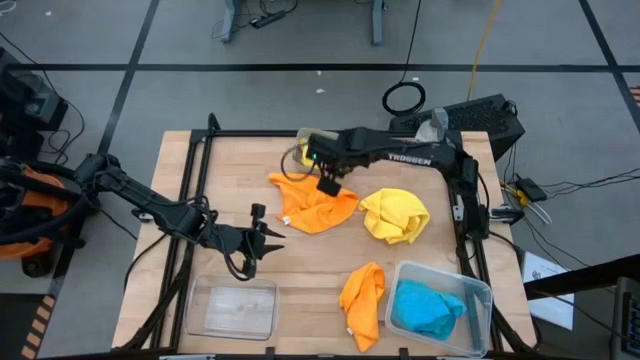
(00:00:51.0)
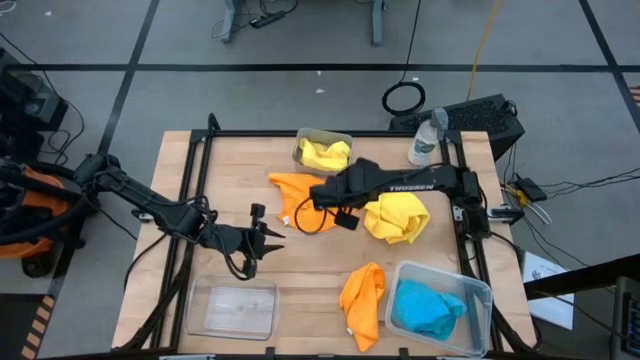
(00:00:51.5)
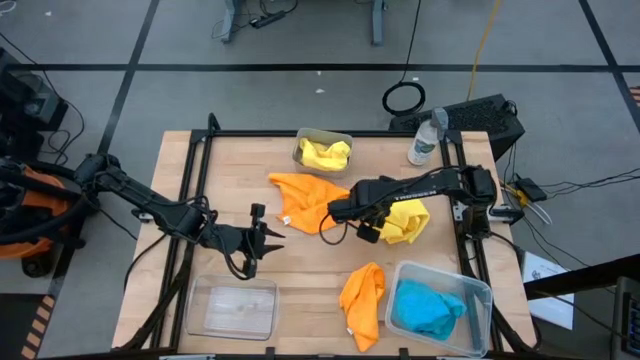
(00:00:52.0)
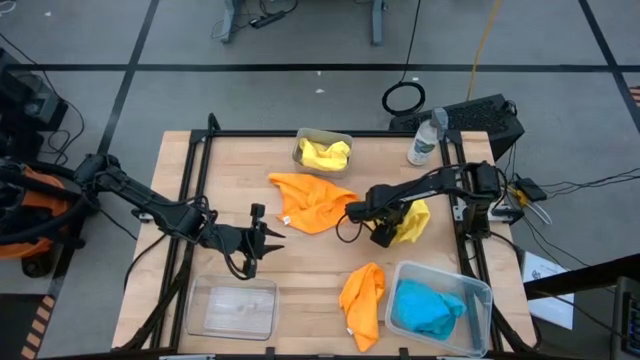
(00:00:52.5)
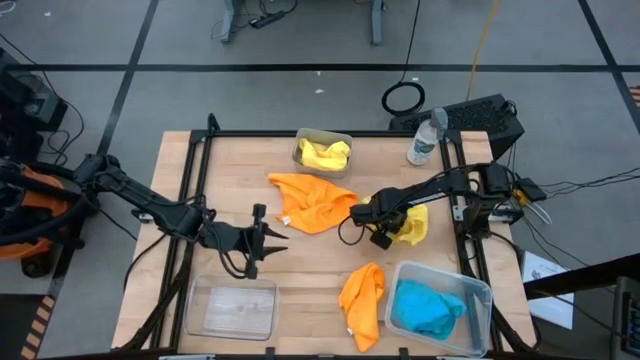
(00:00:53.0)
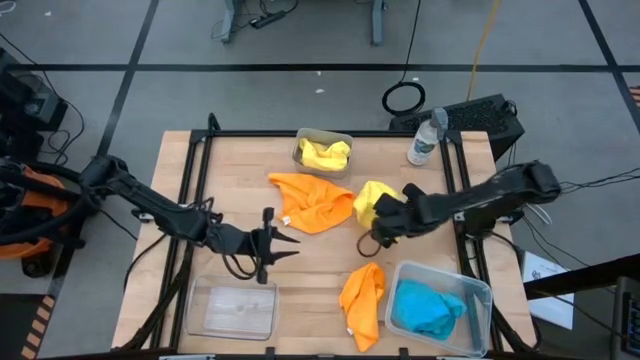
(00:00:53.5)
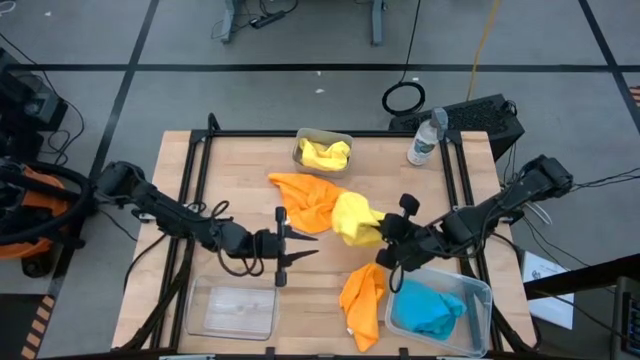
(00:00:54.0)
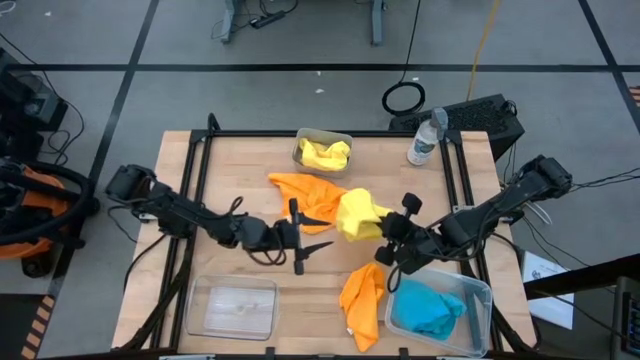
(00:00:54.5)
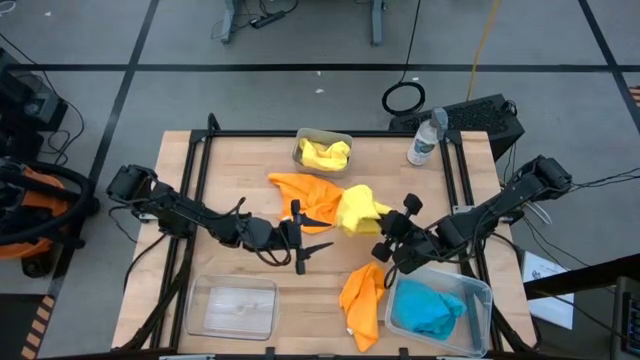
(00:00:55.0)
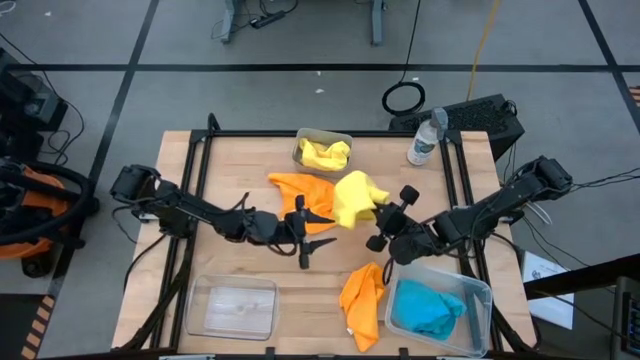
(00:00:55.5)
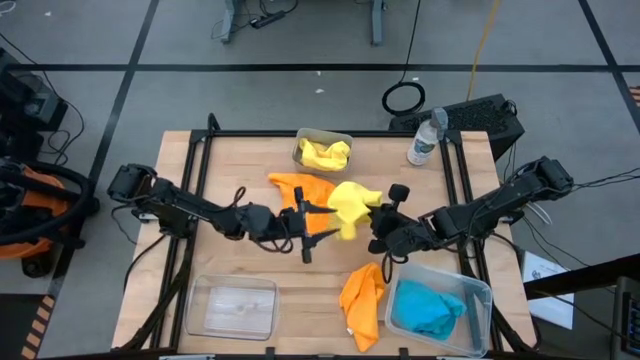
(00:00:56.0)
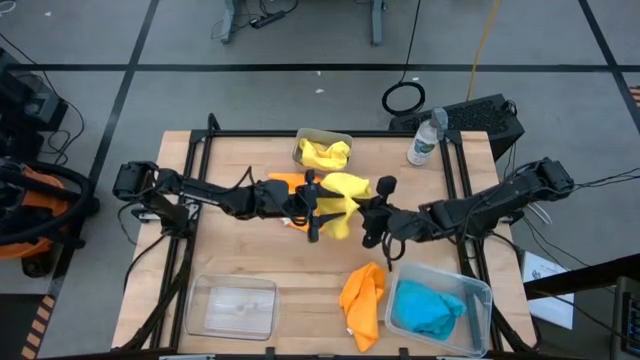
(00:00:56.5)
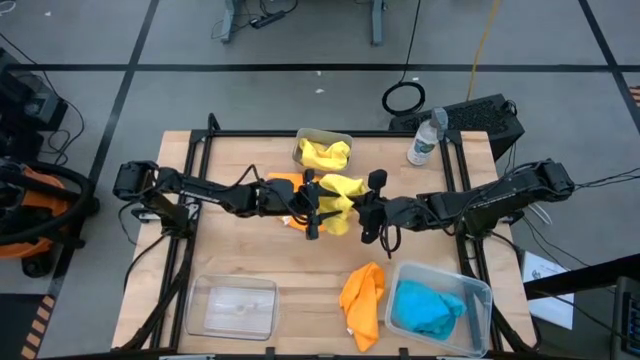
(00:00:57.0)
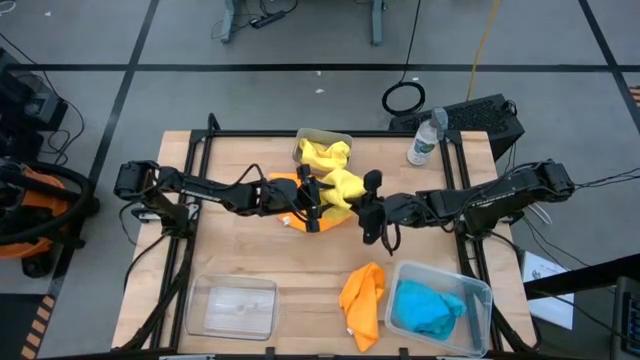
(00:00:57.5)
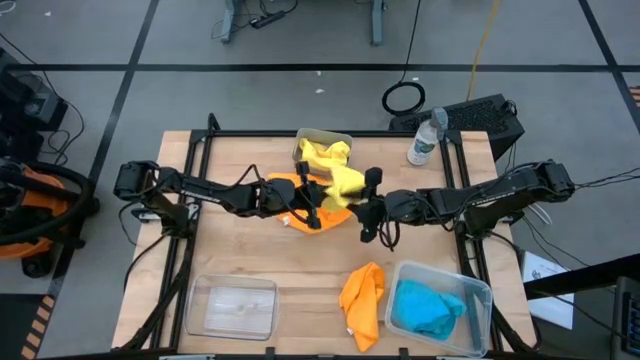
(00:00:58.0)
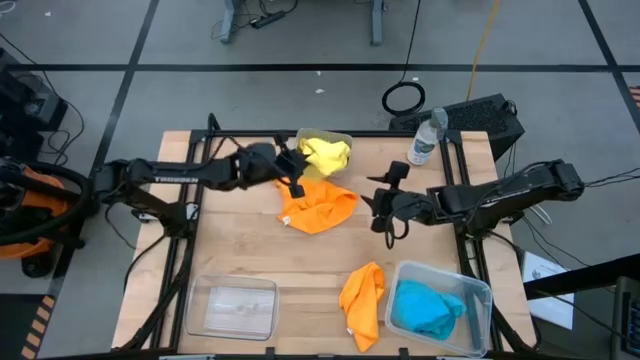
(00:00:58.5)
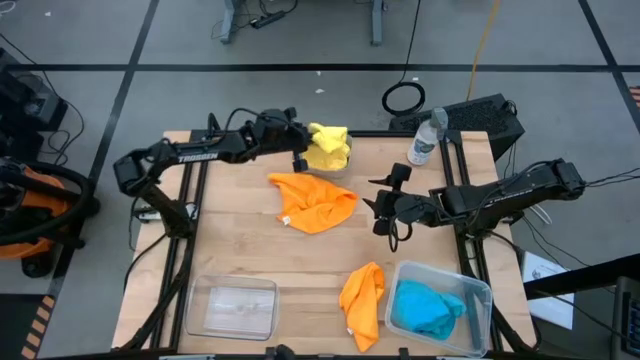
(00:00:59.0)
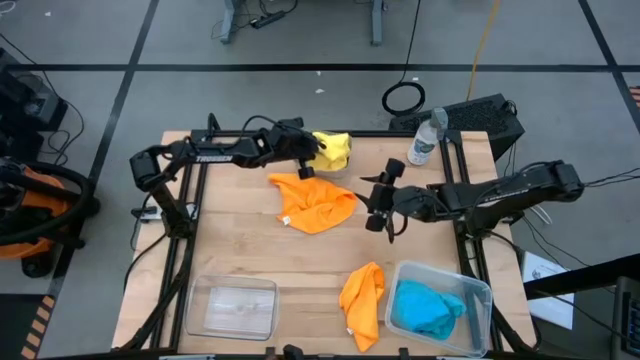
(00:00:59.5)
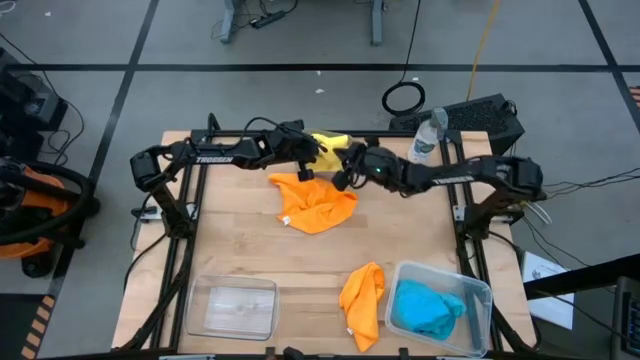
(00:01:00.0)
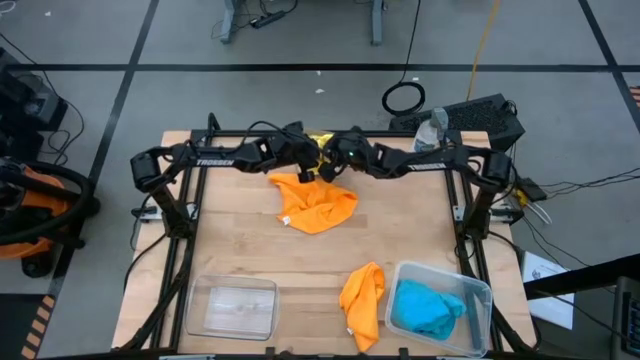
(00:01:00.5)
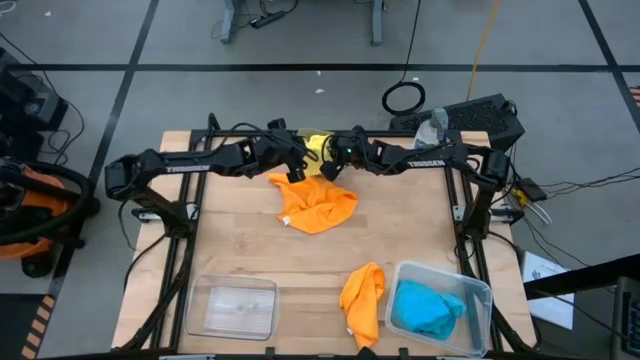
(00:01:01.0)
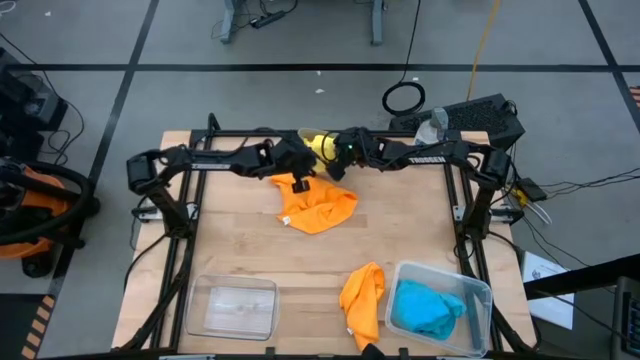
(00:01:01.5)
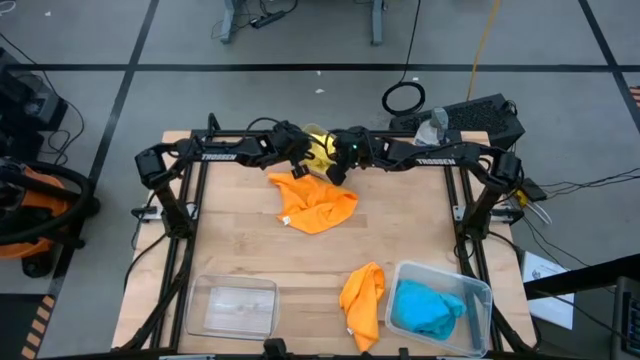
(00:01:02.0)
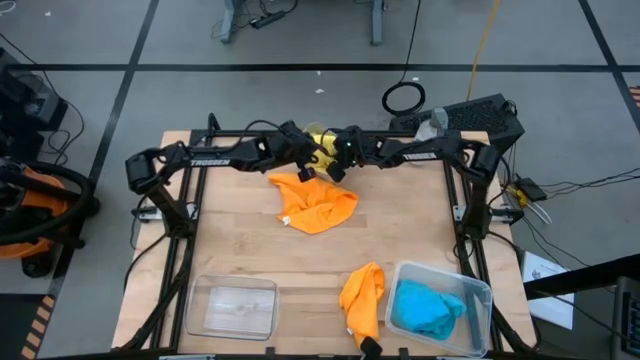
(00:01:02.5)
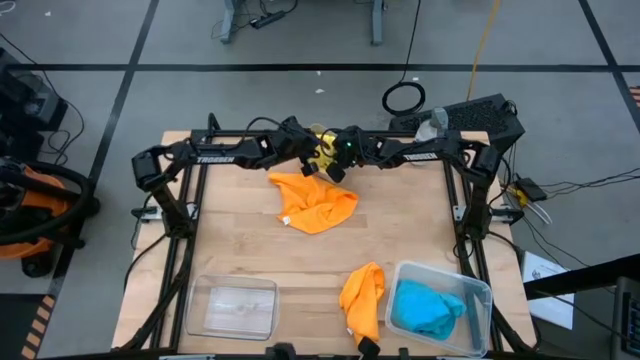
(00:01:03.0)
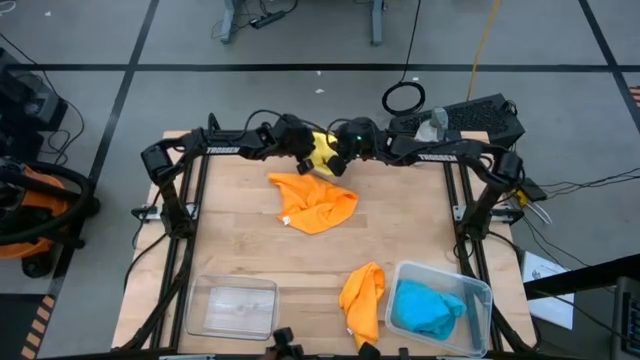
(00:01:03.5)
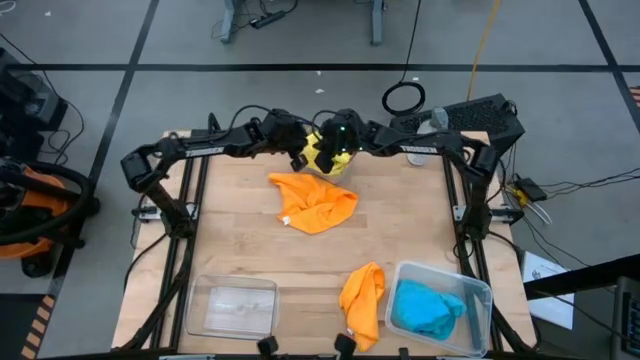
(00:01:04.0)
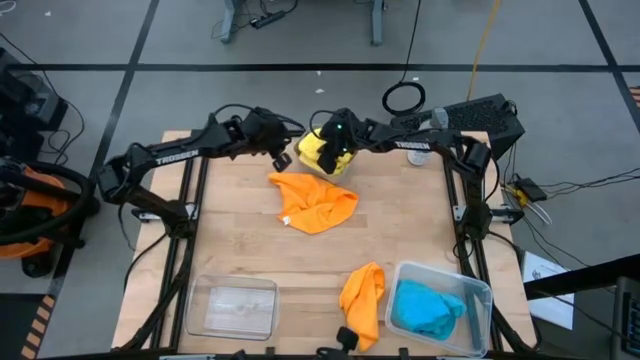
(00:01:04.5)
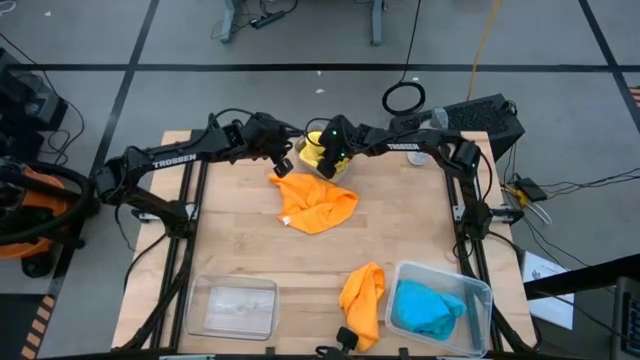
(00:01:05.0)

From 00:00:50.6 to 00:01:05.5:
Task: Sort microfiber towel by color & place in baskets
Put the yellow microfiber cloth into the gray bin

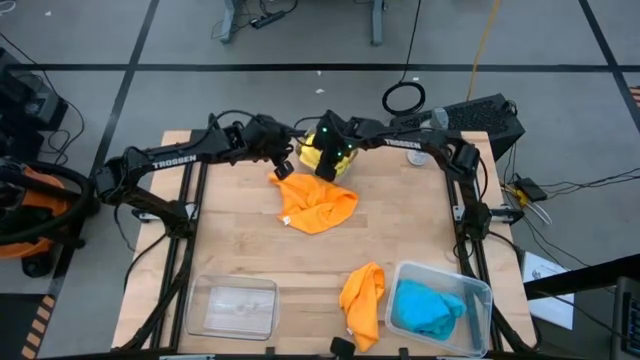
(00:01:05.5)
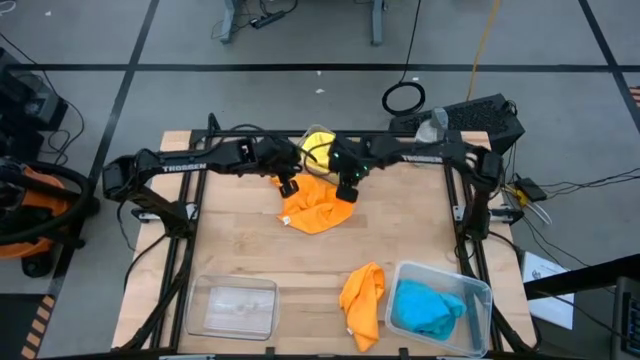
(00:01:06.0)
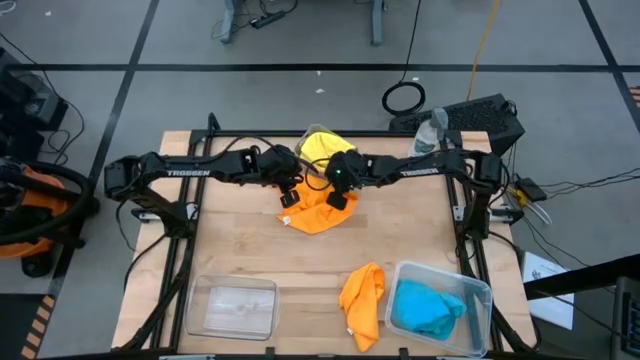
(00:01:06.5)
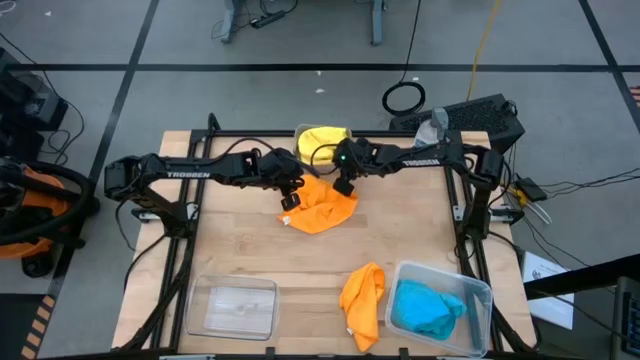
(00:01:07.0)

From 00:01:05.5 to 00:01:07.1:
Adjust the gray bin

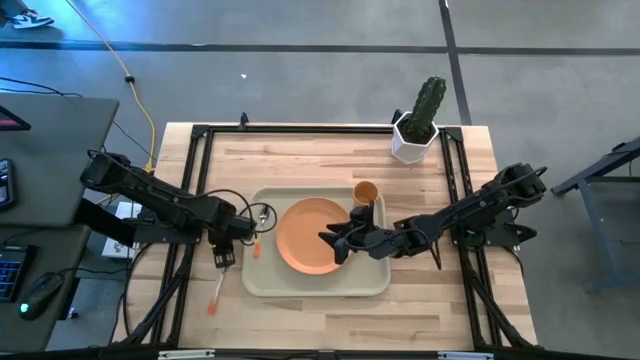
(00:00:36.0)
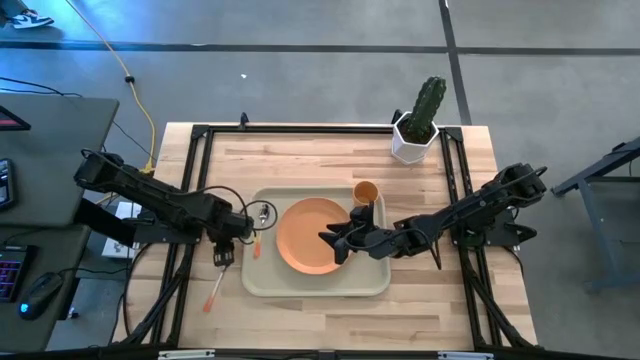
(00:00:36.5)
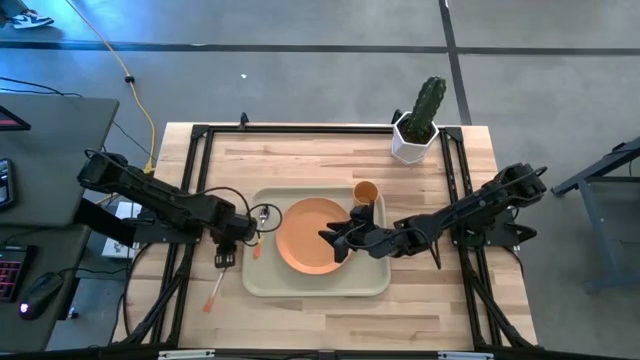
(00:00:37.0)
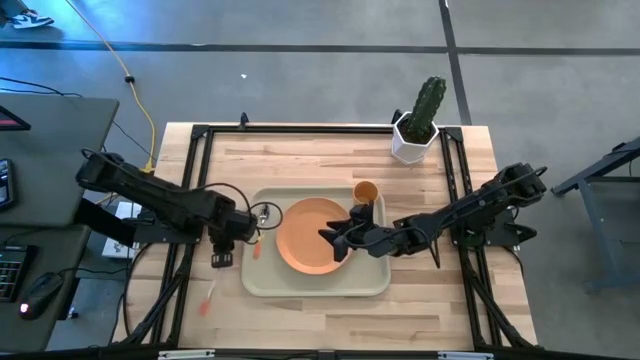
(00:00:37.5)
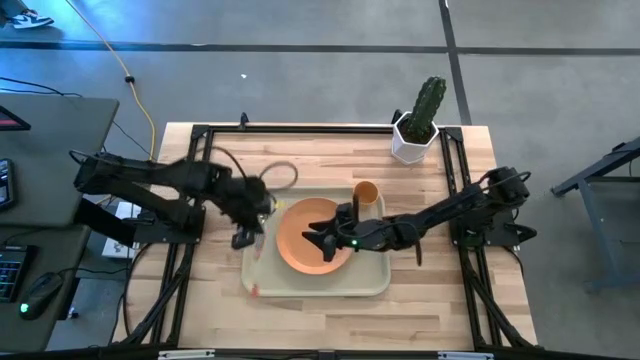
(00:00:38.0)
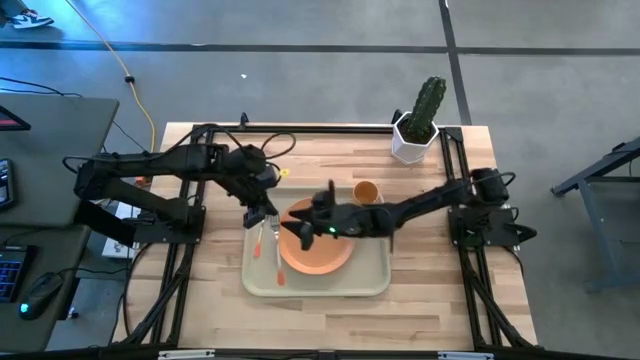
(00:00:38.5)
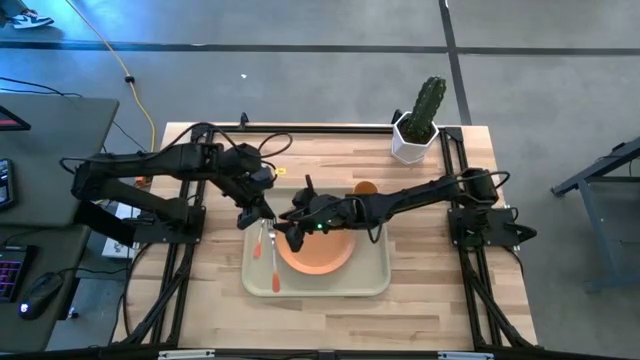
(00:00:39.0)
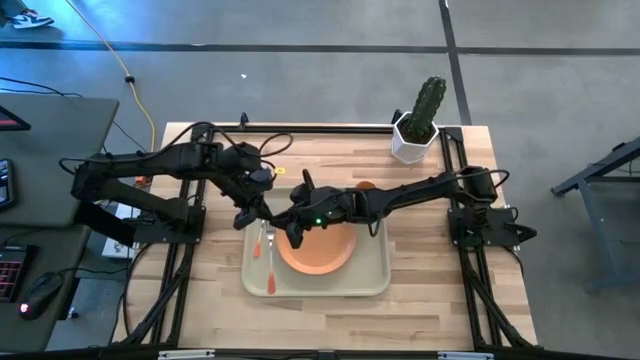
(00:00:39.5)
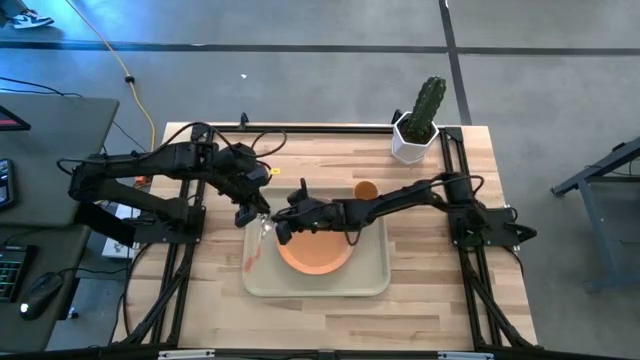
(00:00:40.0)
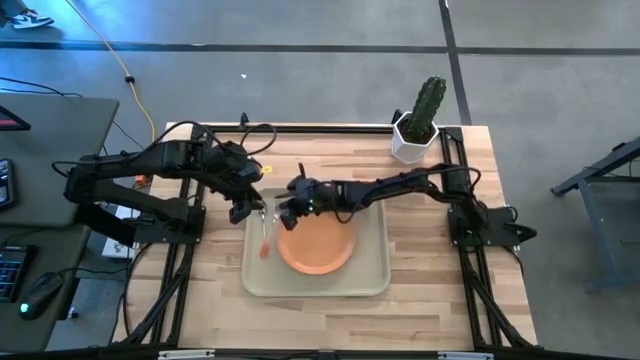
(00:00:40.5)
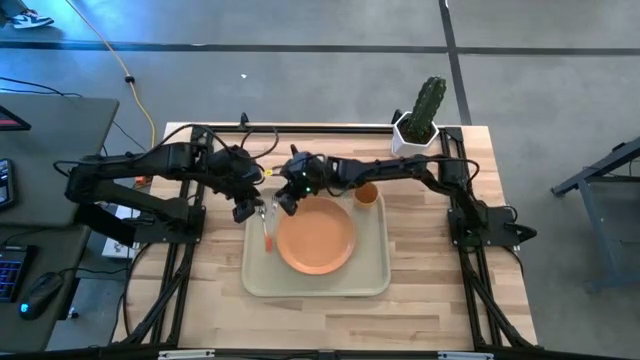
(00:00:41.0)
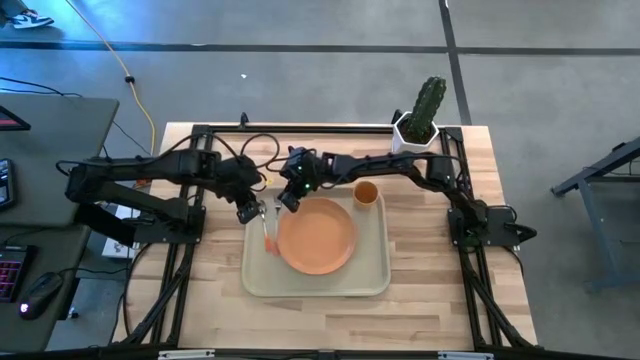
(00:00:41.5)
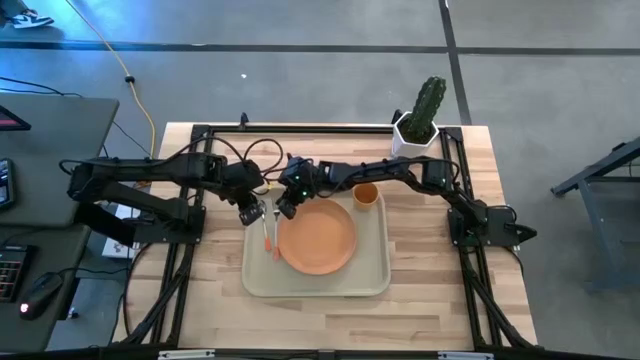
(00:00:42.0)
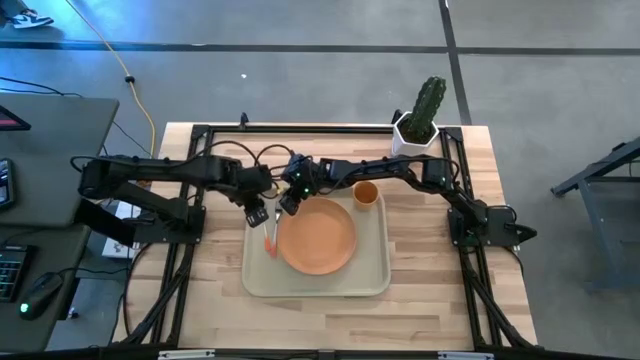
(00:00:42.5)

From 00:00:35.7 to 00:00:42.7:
Task: Pick and place plate/cup/fork/spoon on tray
Put the orange fork between the orange spoon and the orange plate on the gray tray
